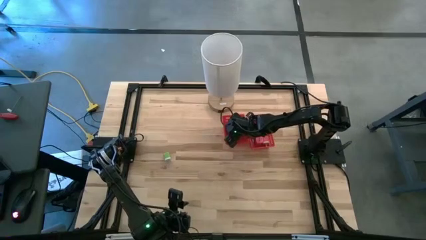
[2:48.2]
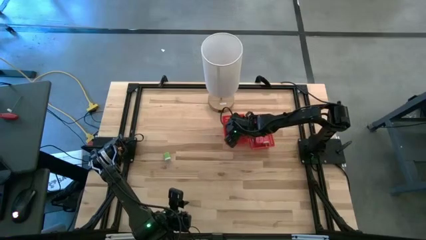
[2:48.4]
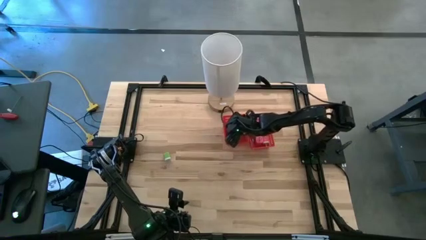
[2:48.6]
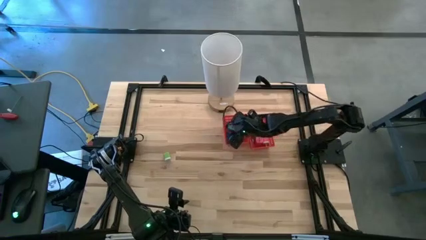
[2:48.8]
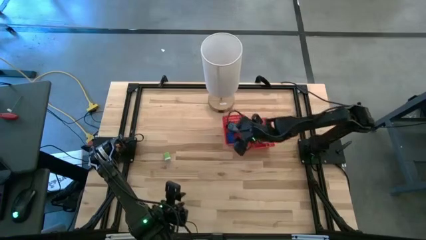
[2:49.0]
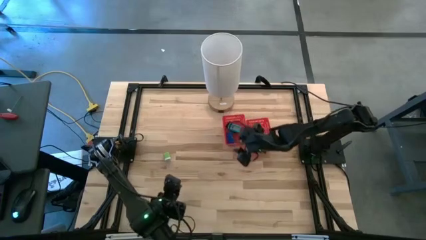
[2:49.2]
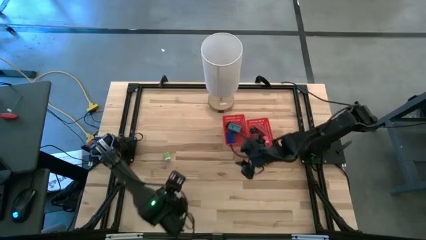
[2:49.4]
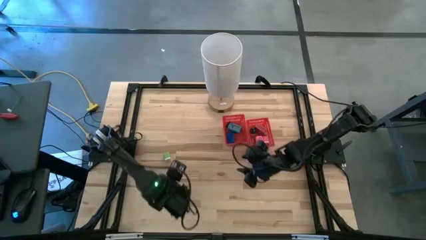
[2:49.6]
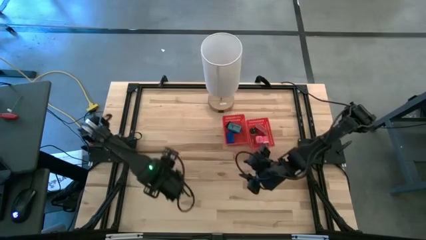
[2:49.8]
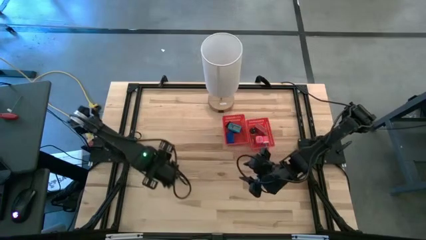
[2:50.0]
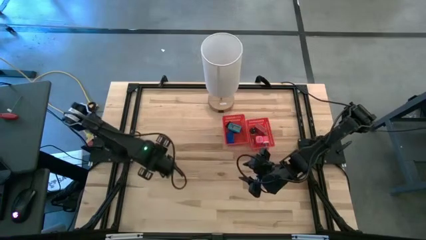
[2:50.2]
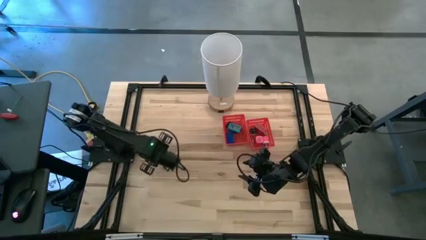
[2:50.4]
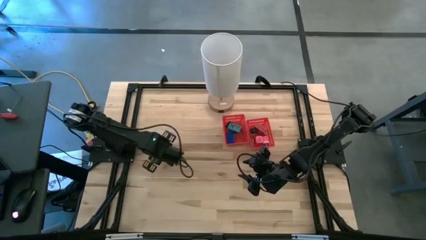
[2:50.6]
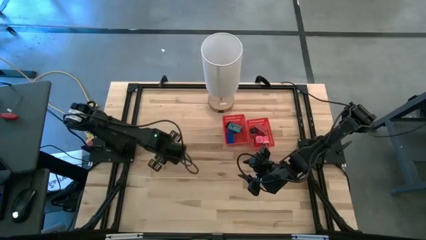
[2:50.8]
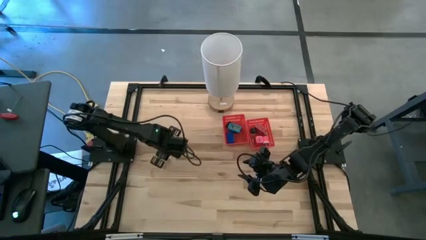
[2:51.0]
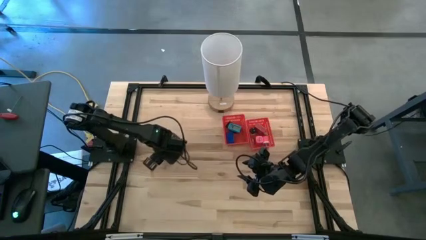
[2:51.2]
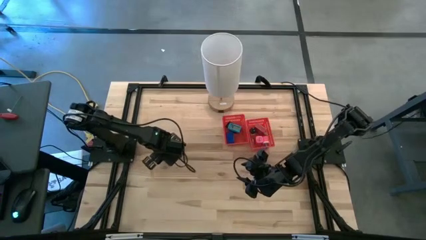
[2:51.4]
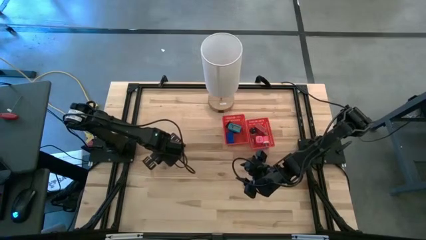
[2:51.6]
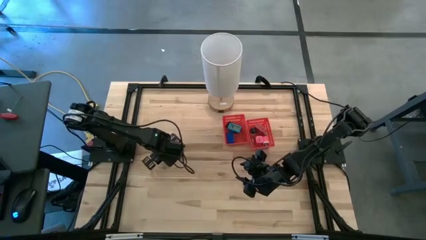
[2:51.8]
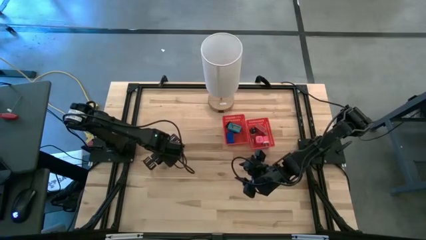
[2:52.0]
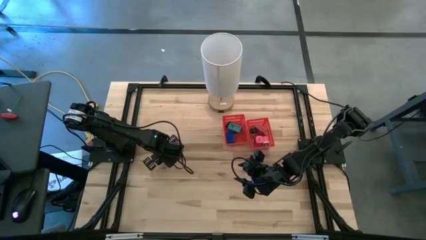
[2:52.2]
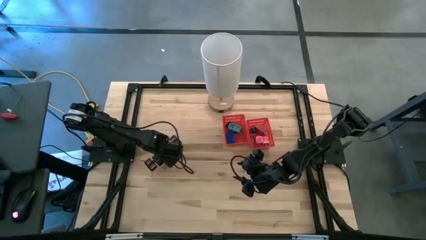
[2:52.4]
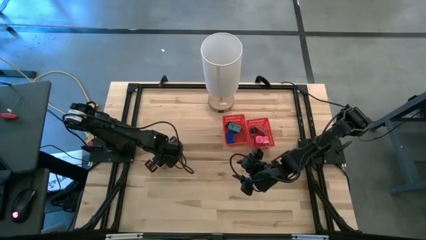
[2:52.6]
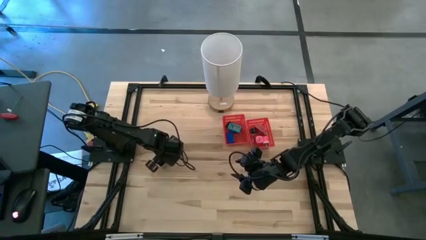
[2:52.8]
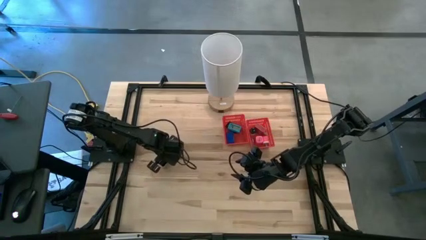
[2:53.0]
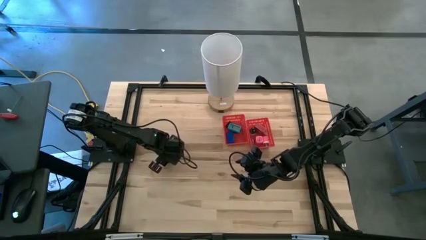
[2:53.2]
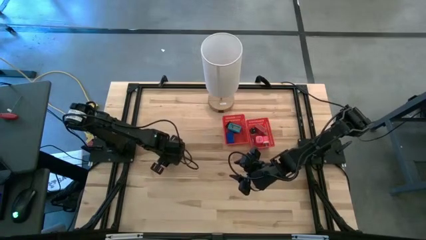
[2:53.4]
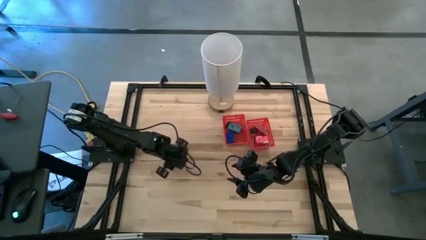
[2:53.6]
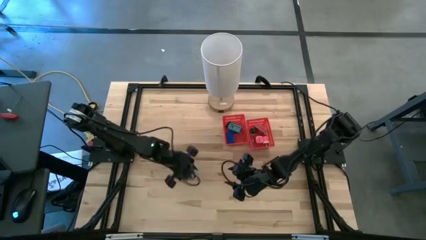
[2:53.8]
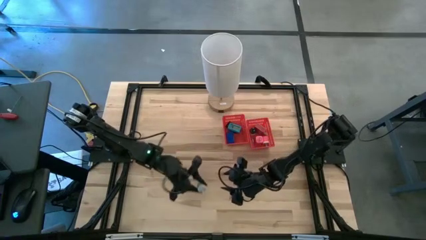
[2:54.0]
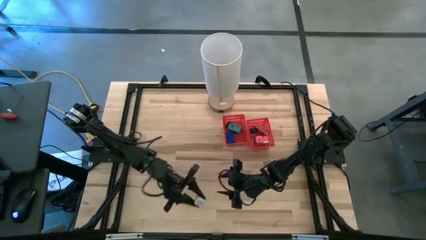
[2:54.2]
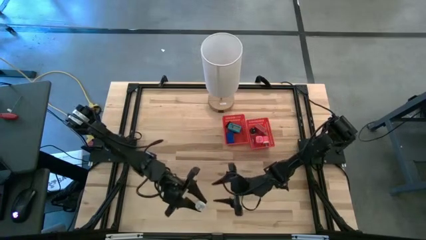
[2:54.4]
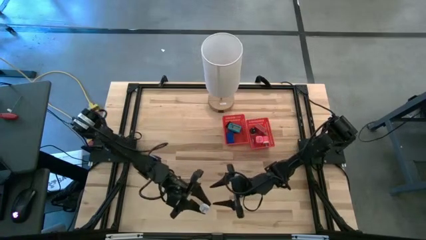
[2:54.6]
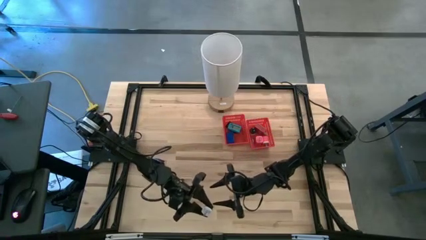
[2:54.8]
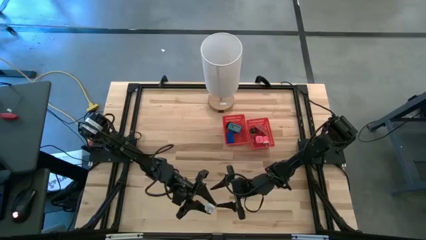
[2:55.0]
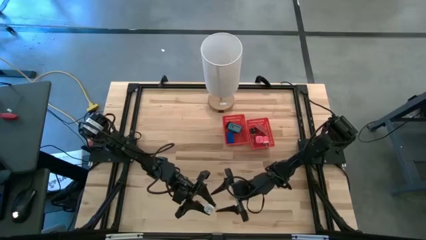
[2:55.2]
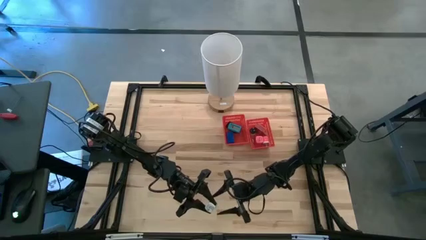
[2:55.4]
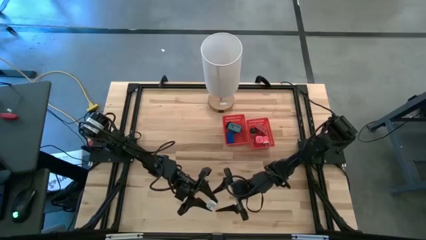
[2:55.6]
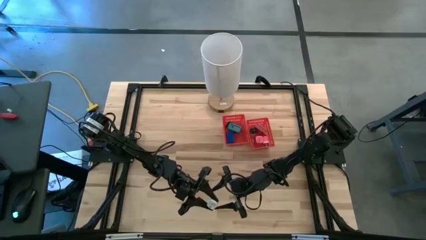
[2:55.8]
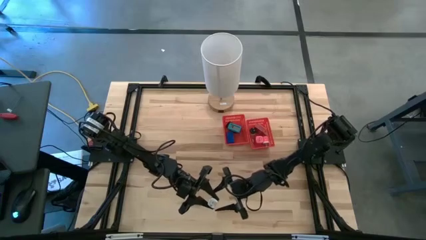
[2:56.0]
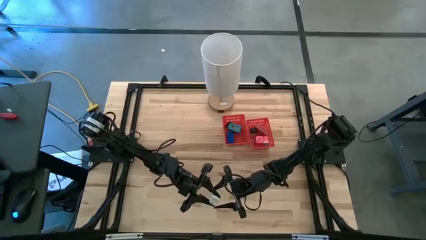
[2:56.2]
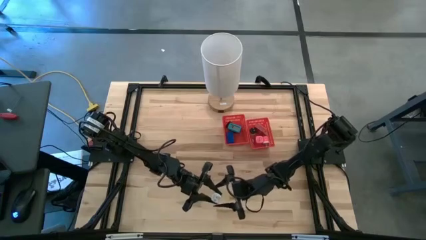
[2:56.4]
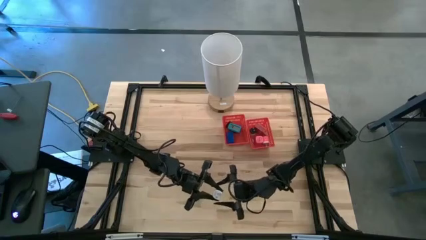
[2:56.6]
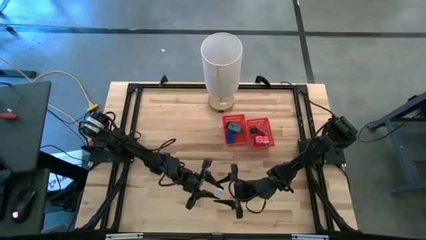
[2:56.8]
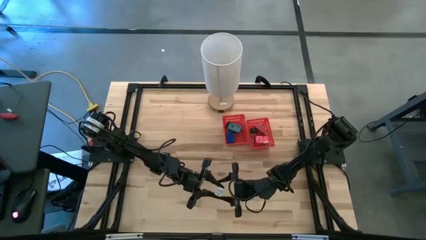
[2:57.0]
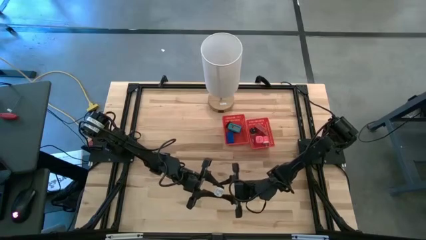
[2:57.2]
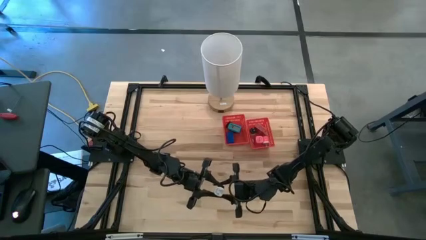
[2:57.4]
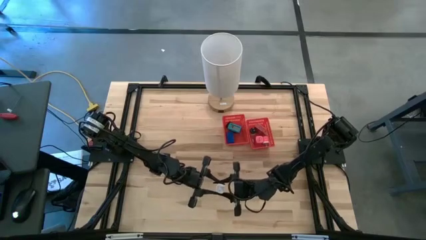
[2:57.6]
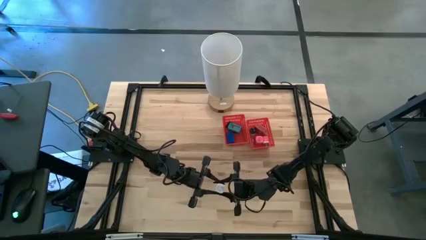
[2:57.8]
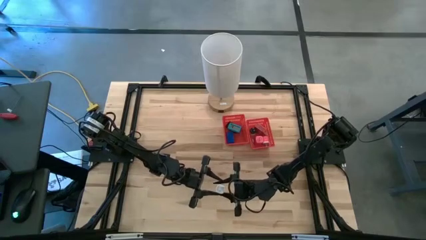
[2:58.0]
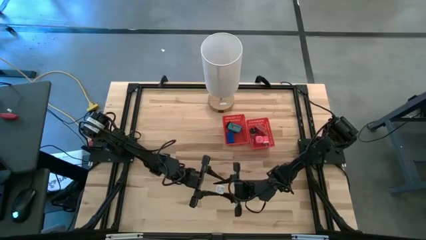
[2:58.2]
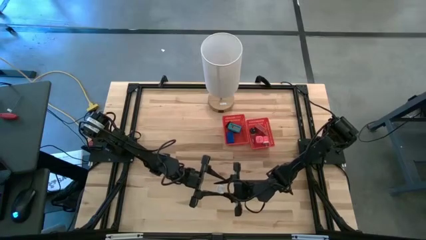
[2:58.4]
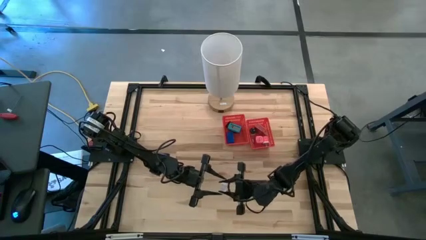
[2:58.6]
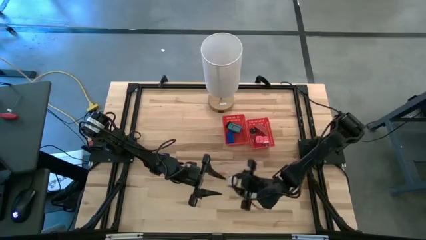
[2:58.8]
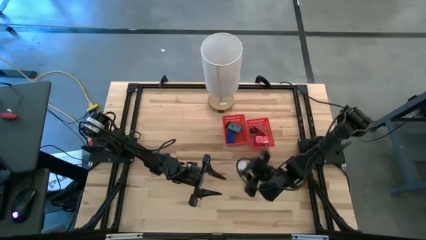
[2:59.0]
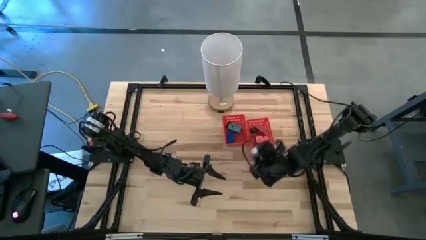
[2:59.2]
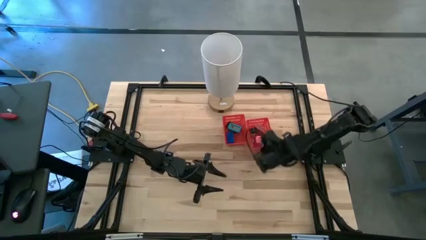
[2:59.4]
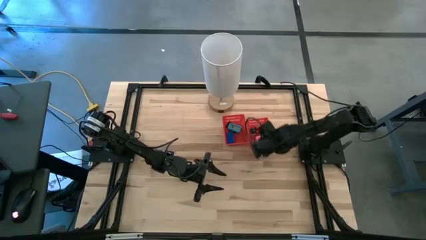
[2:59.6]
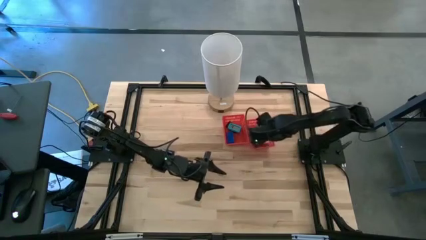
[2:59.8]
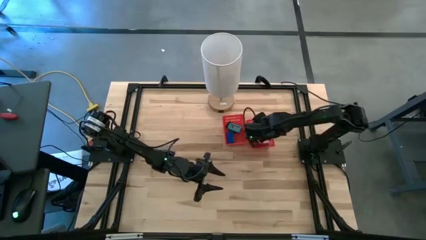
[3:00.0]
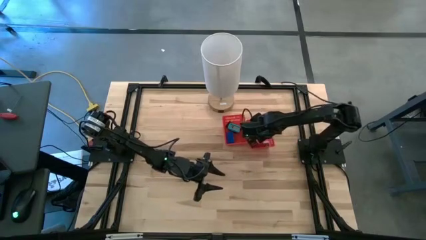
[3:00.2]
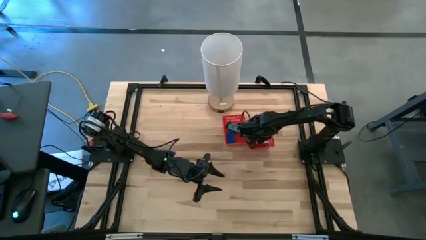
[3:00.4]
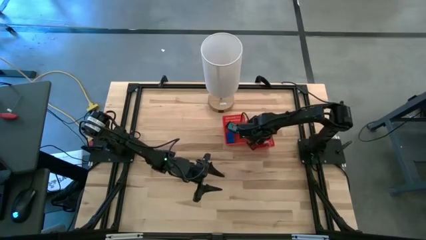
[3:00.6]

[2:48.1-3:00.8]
Task: Pick & Place Office items
Put the green charger adapter into the right red bin

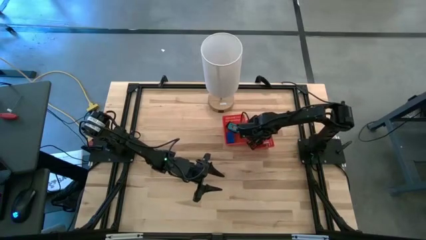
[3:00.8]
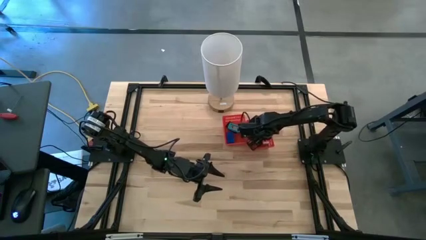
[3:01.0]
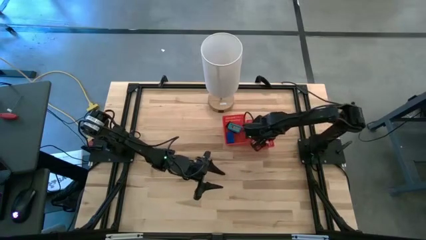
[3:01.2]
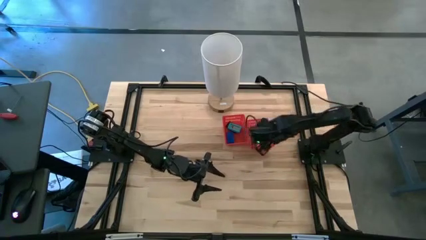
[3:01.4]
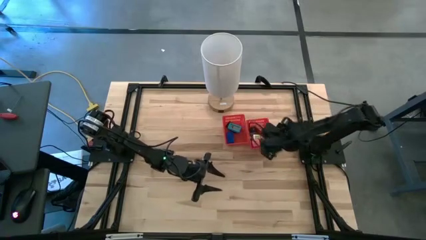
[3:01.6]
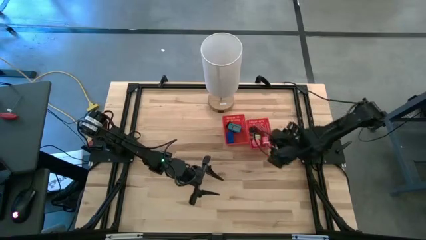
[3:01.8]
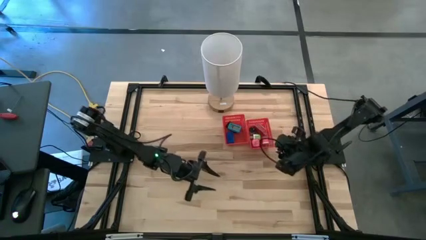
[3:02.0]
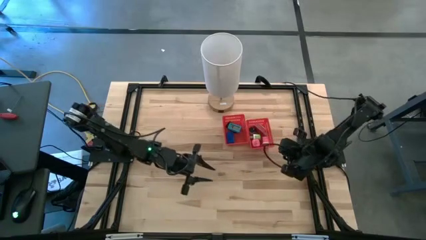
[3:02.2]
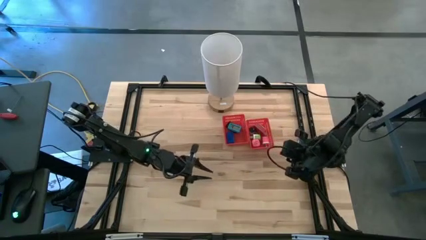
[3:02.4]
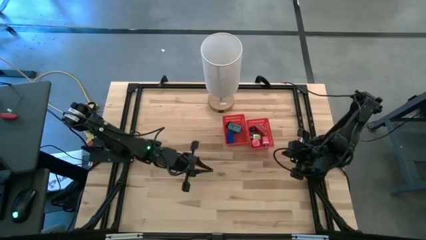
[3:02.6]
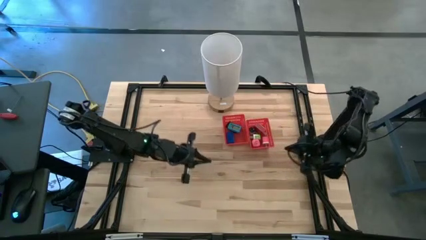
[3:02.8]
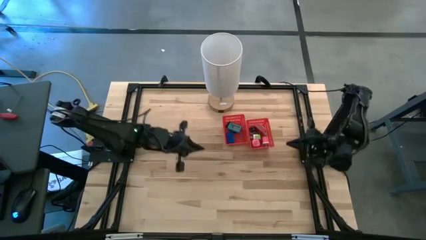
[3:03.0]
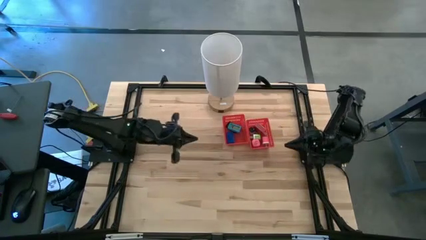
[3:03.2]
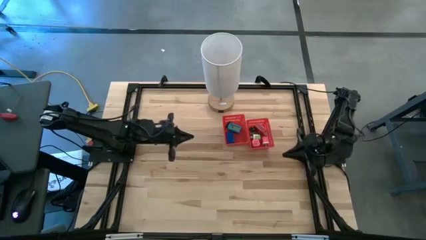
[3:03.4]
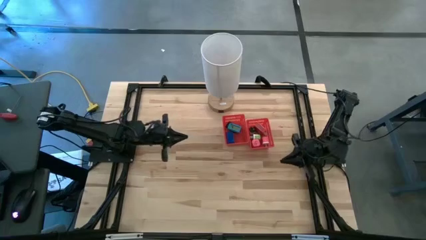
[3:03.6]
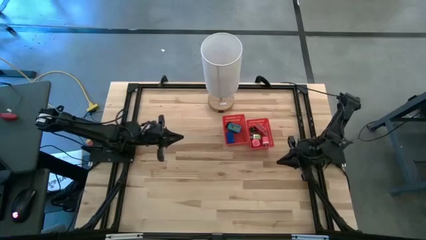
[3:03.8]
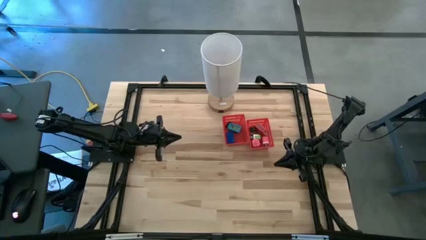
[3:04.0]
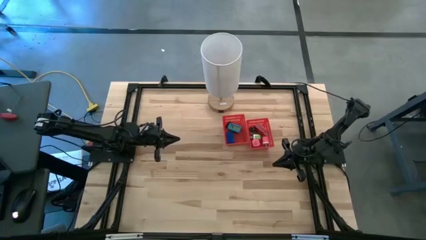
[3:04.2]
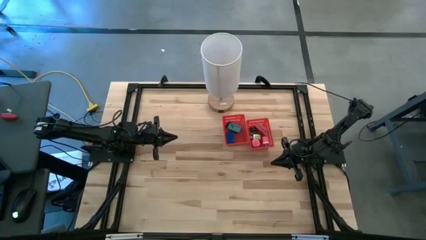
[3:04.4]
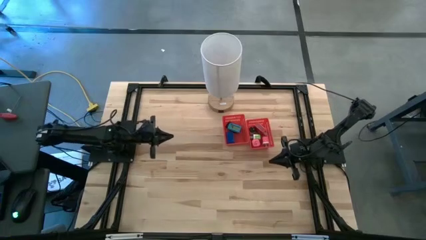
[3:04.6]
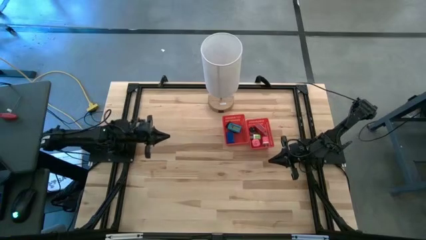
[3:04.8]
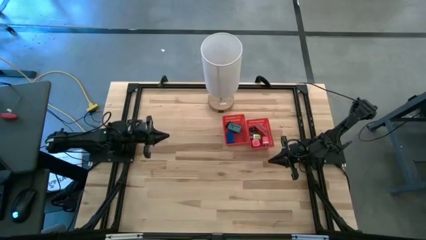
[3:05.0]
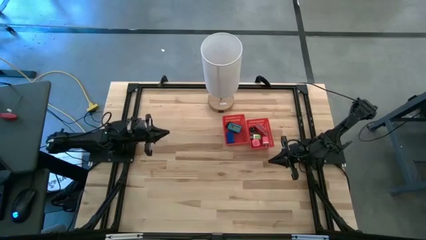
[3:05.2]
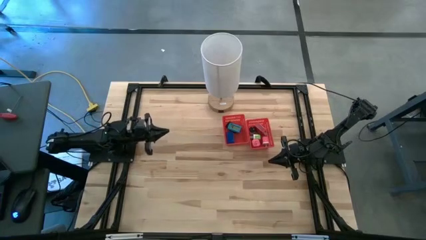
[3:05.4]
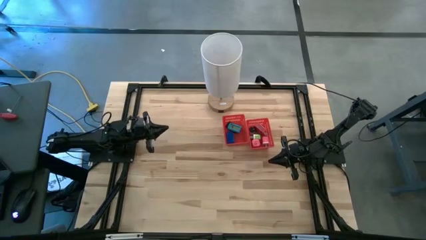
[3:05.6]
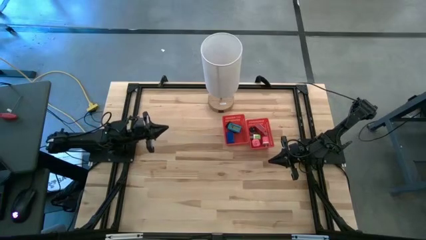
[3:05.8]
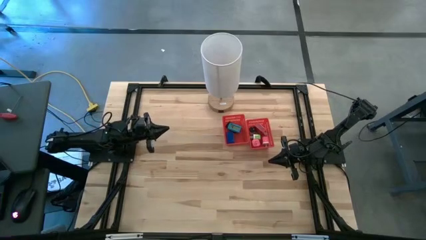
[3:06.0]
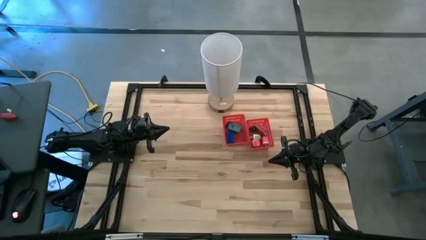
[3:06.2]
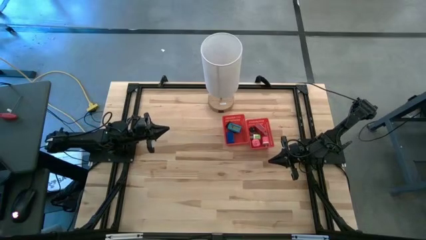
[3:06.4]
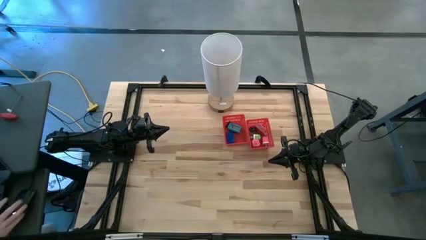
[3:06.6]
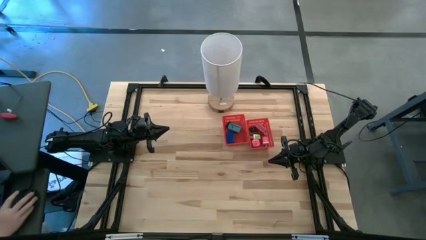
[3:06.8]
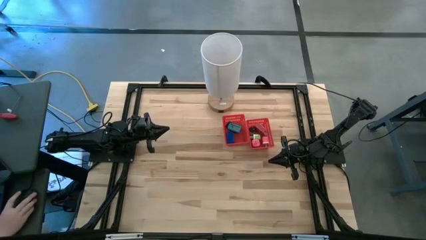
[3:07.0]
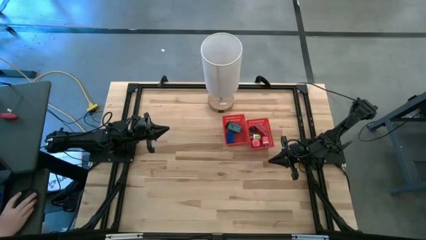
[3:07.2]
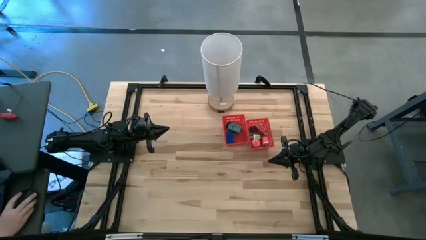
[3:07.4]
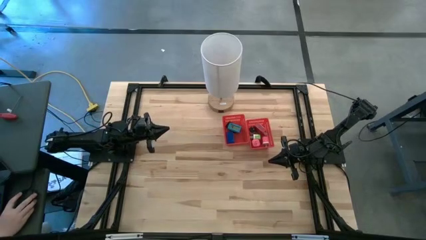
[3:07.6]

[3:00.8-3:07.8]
Return to Home Position
